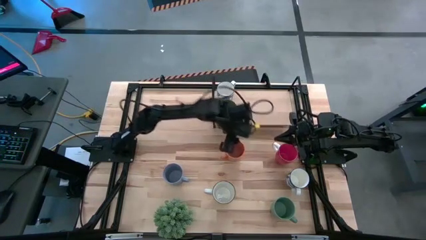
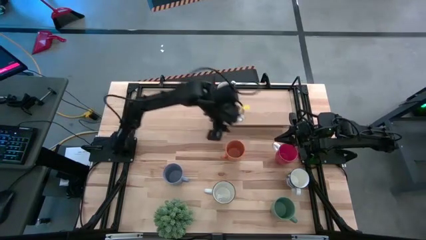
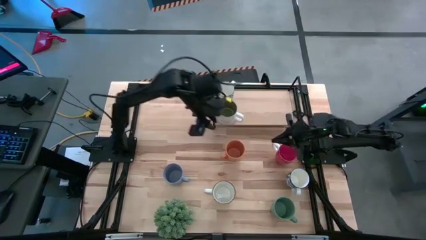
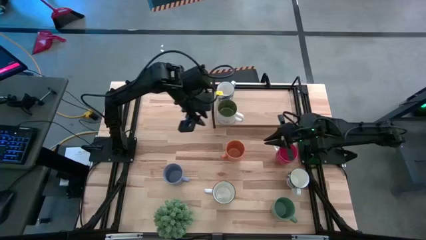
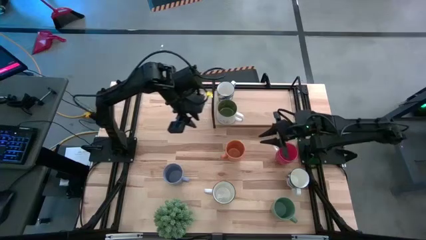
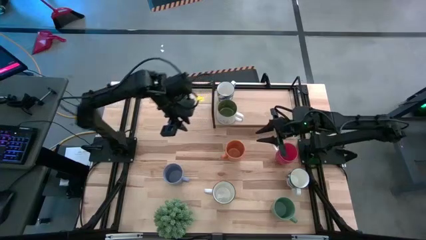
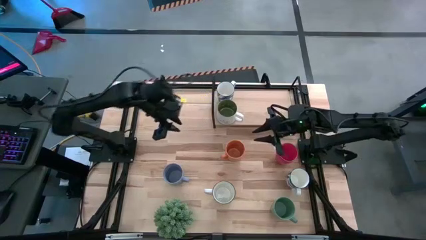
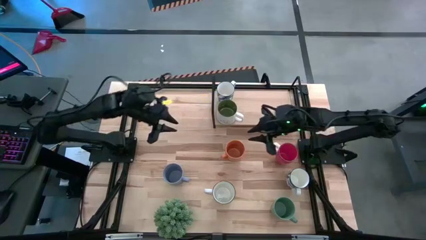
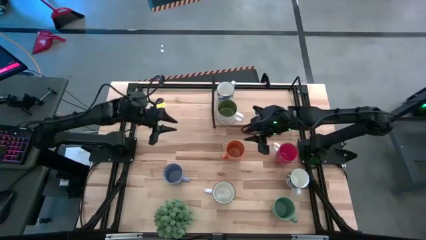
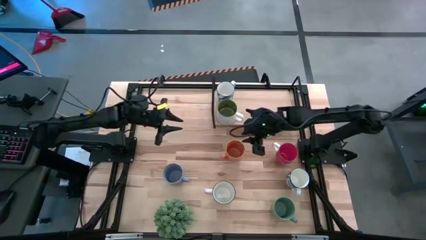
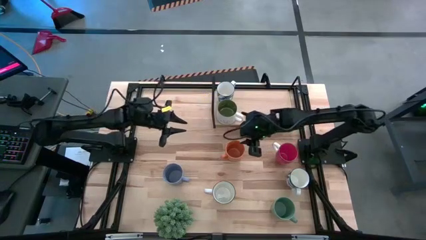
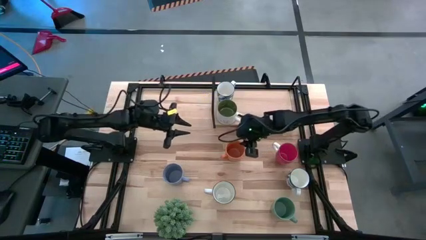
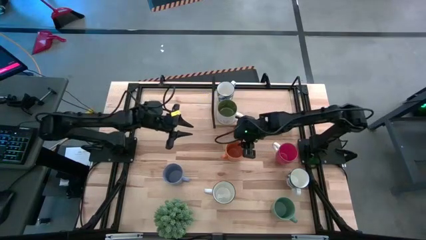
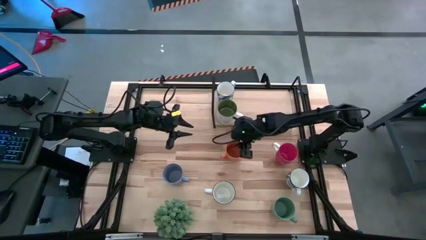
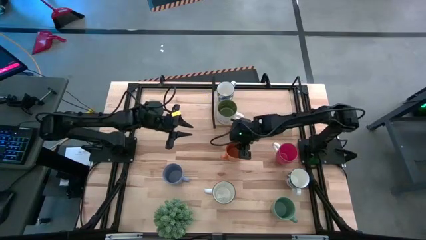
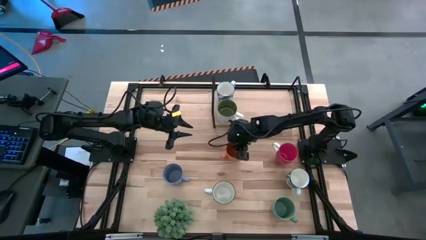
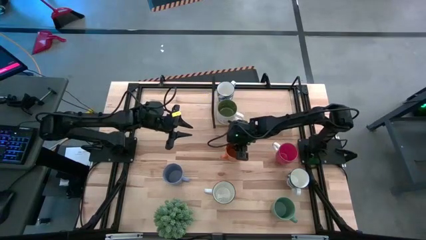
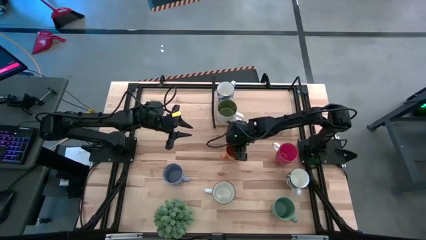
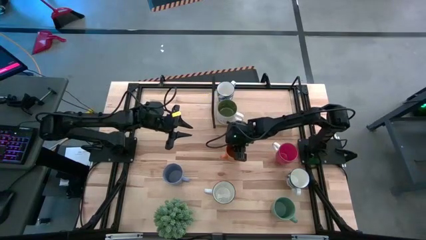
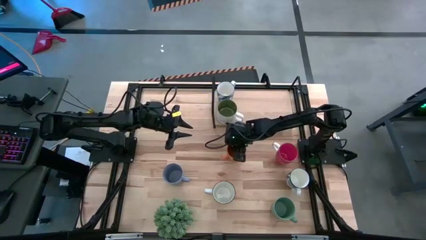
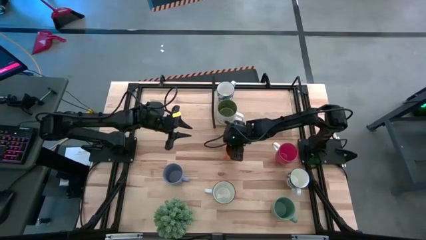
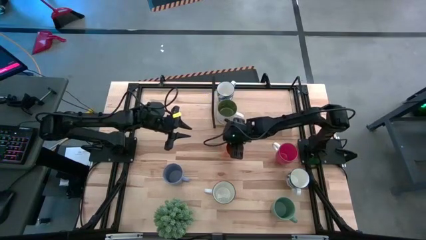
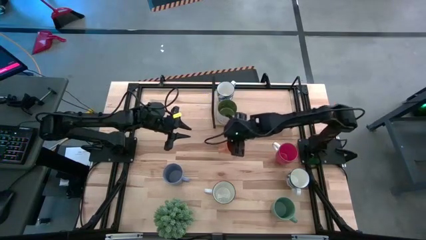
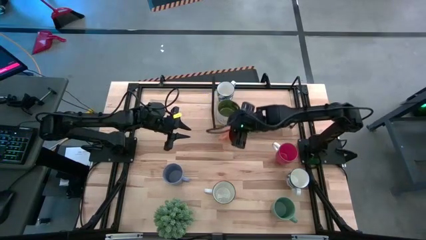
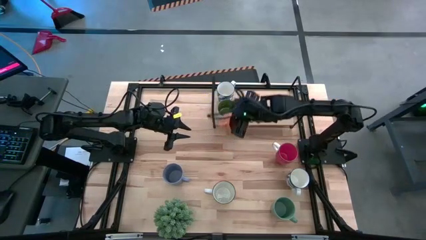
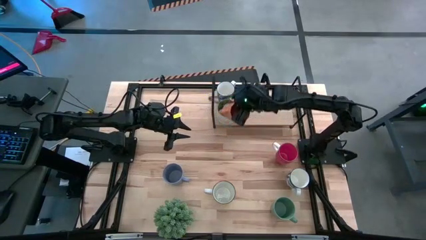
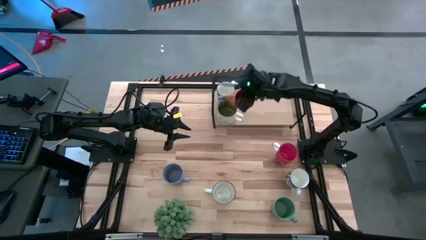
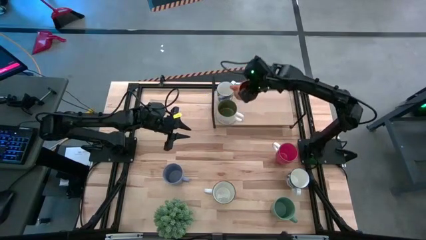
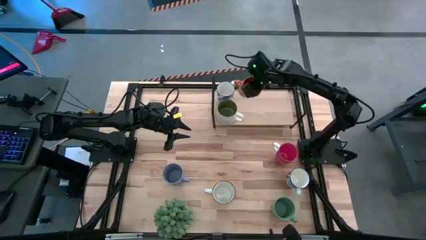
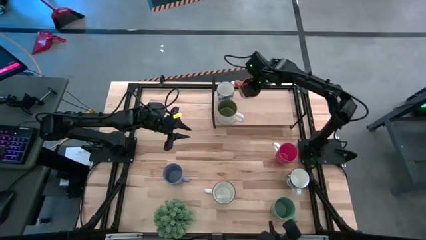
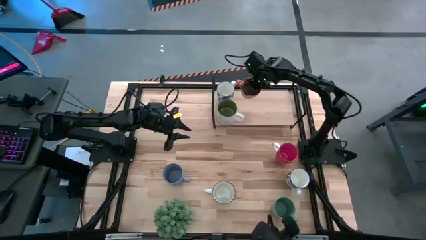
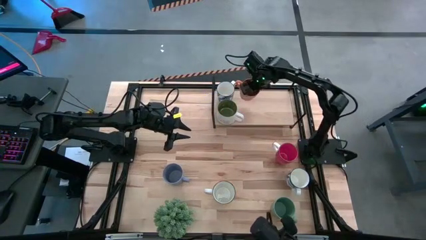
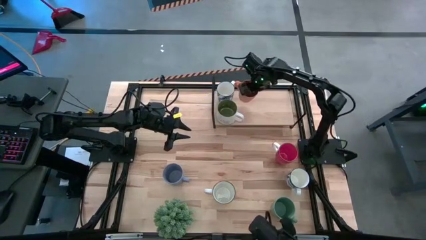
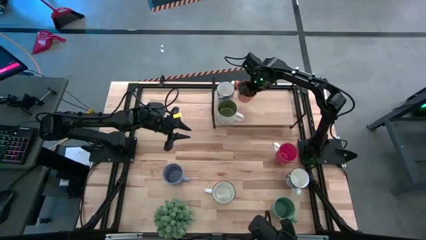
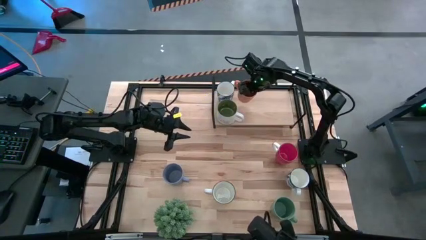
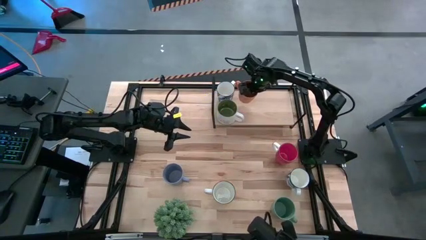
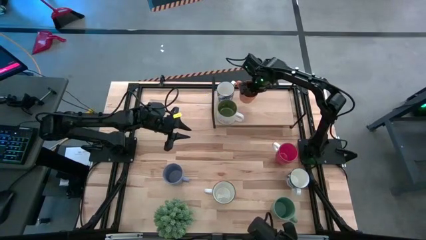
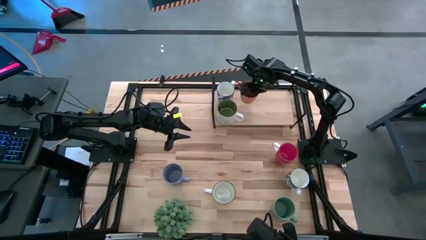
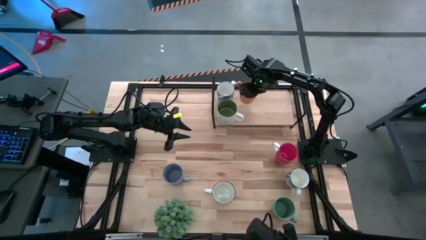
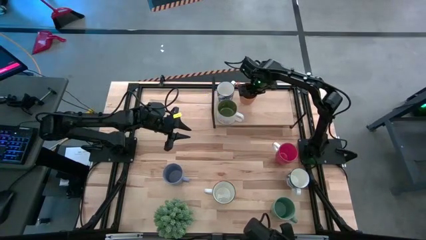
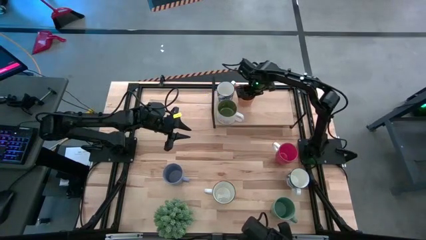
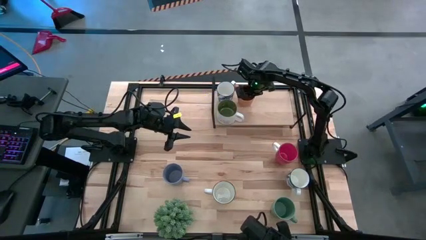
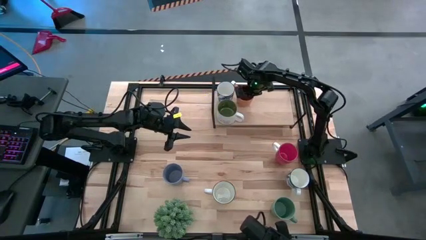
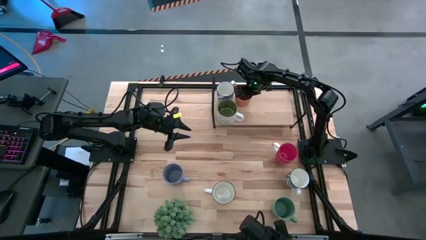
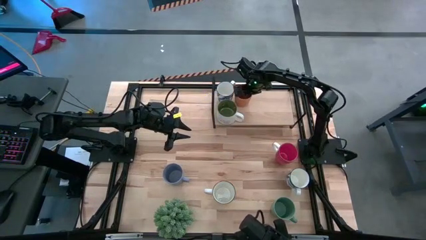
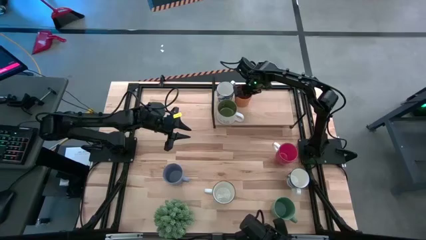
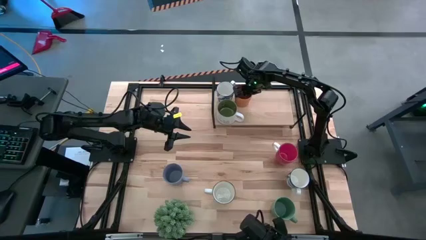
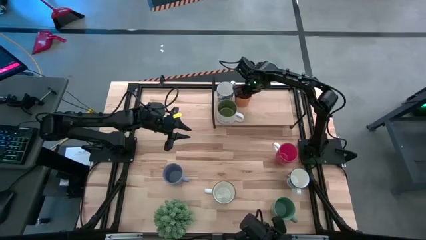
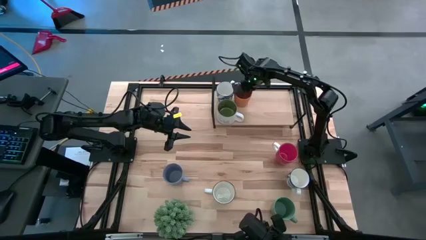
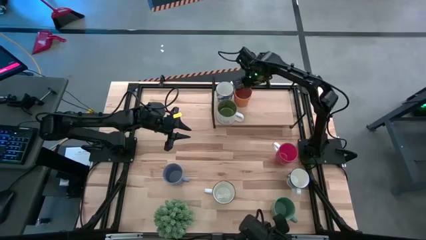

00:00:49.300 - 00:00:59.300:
Task: Place coffee mugs
Put the orange mug on the shelf

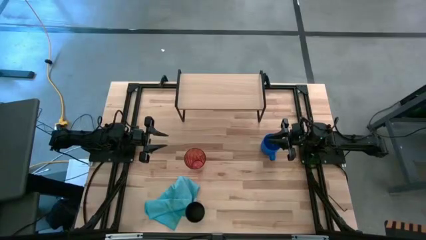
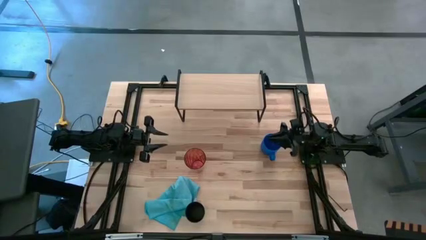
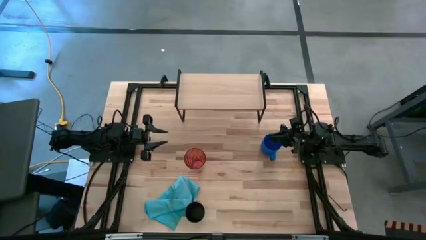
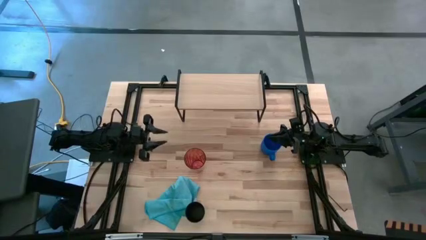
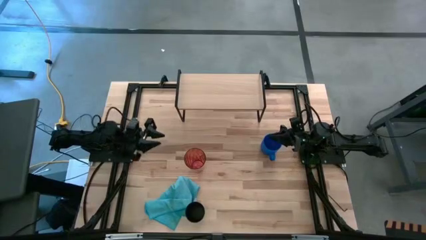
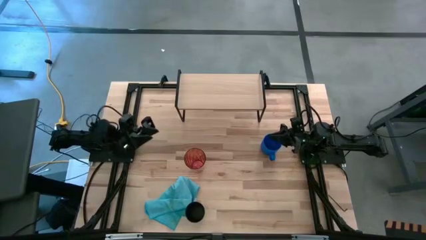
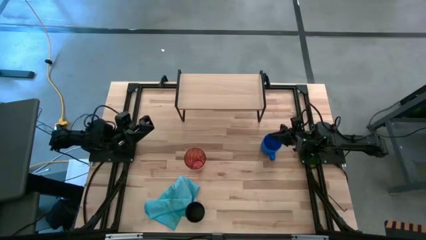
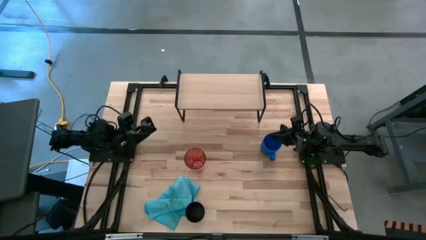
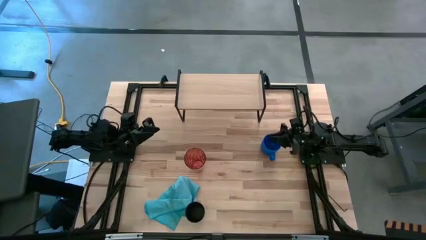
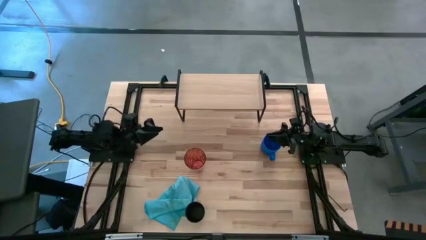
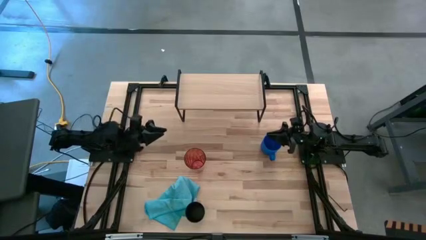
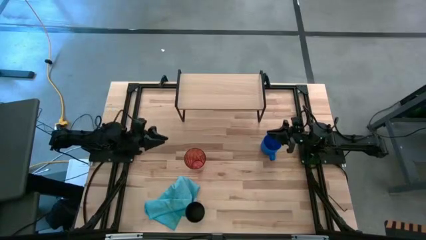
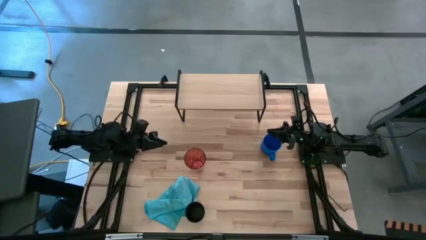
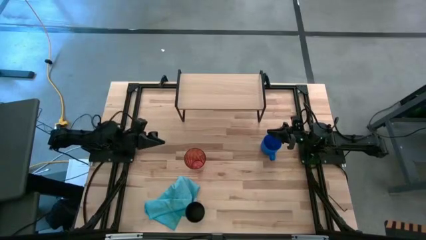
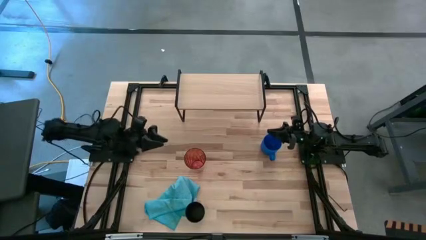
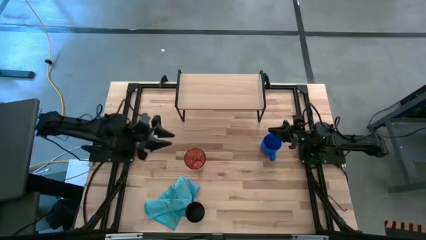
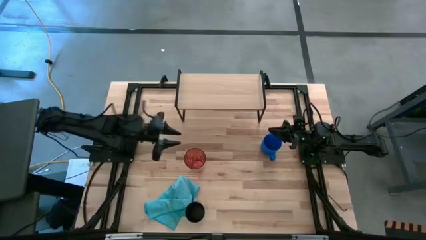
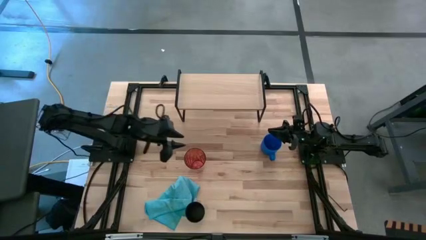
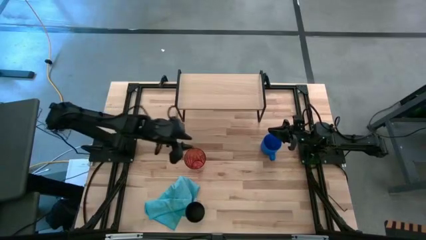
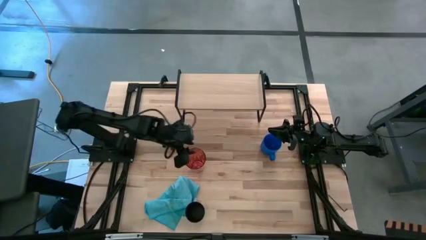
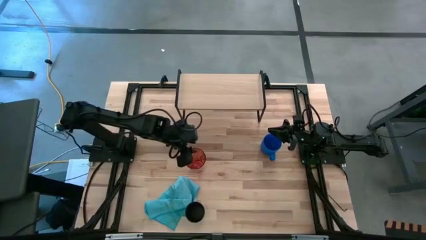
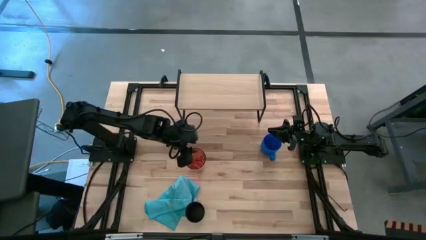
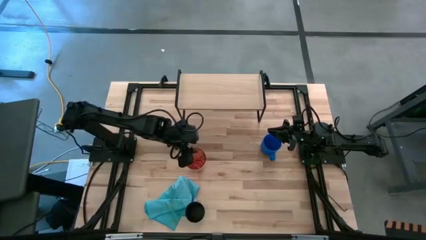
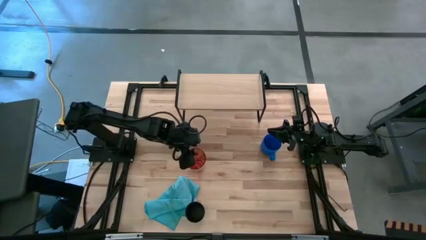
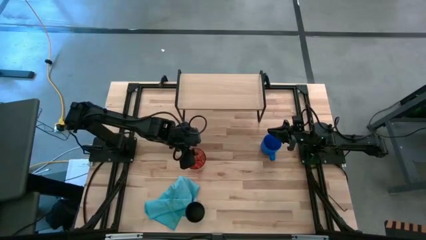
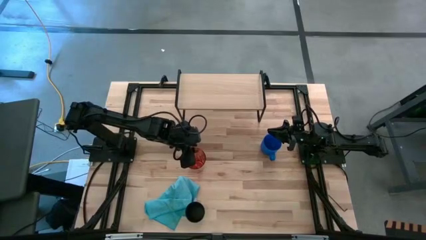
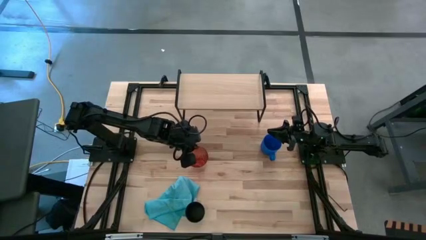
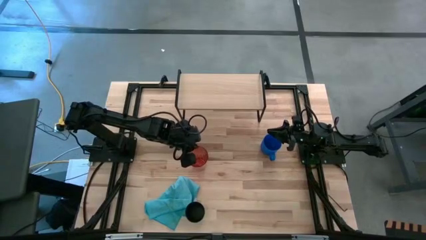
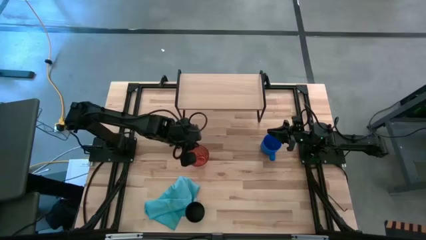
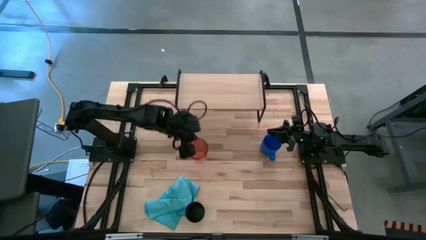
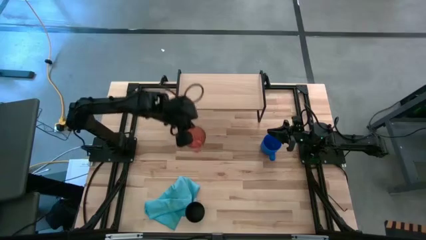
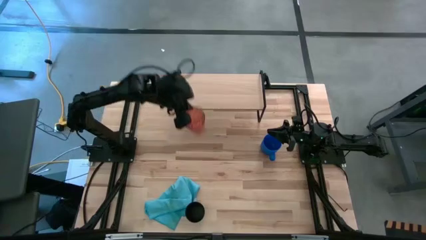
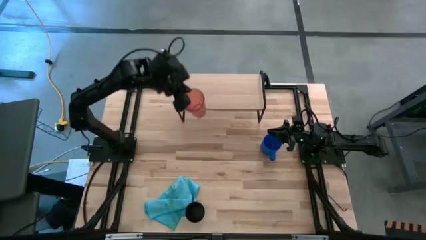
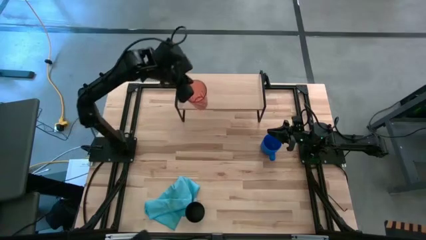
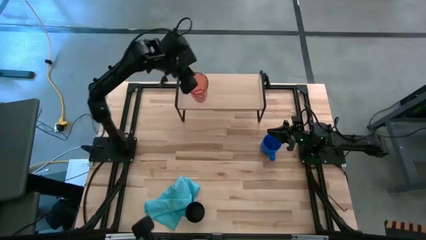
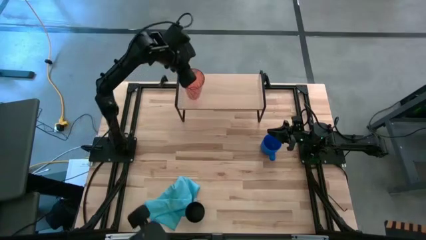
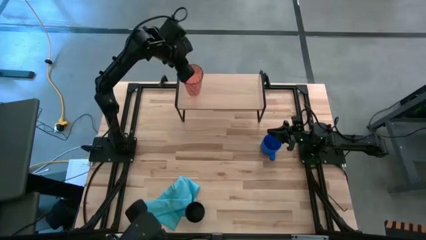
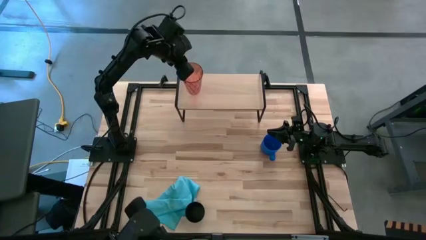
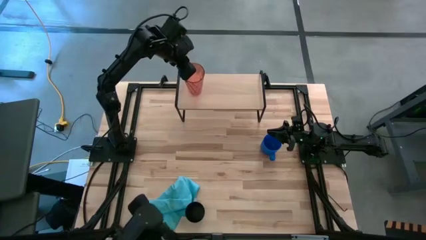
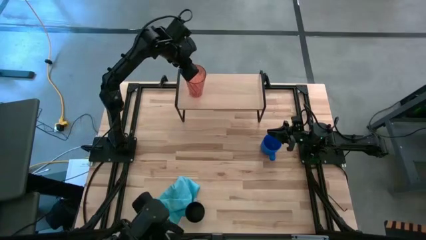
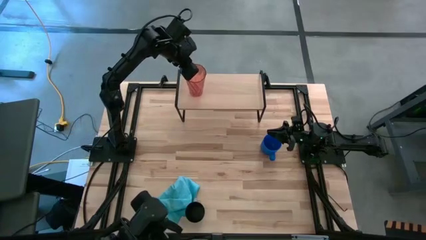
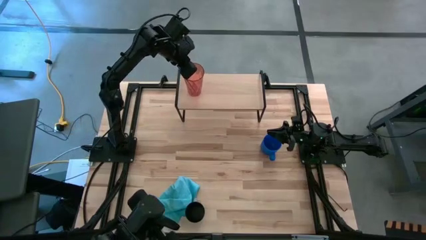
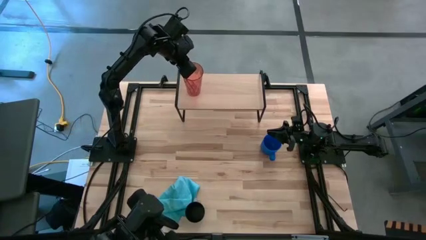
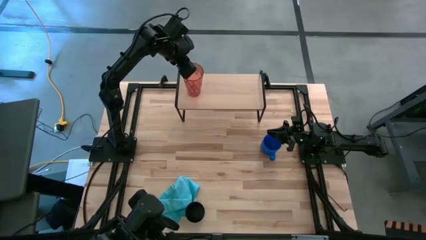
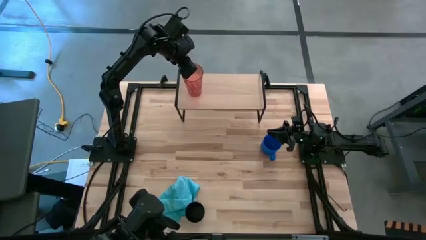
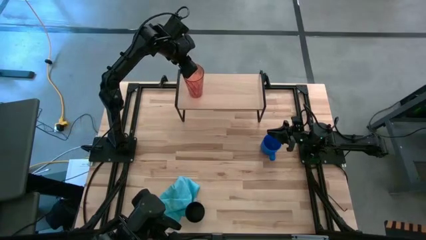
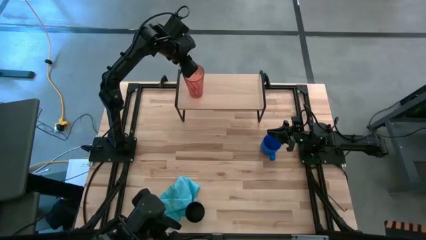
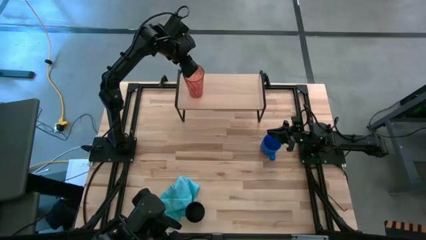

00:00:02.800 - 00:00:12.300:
Task: Stack small to large cups/mugs on shelf
Put the red cup on the shelf
